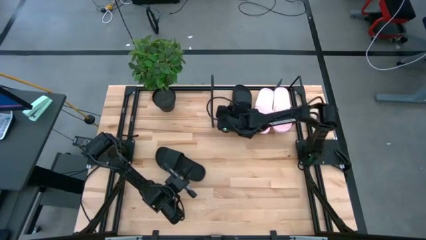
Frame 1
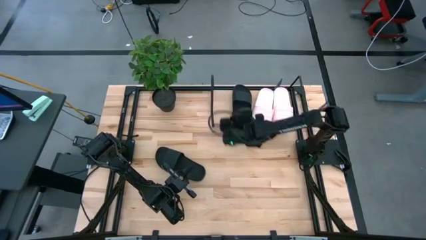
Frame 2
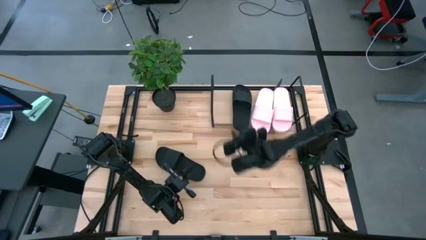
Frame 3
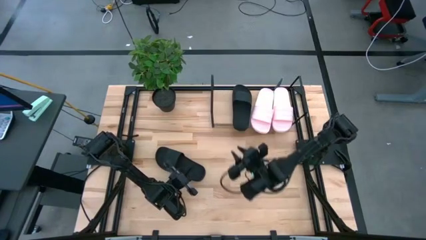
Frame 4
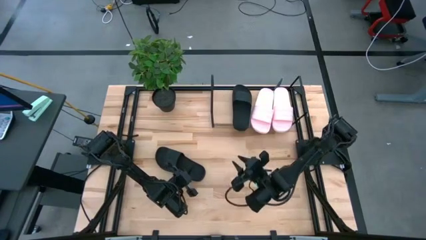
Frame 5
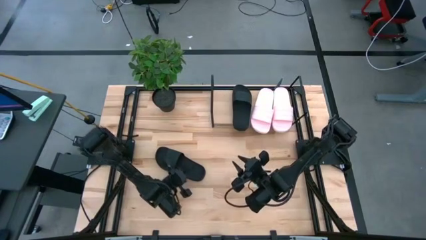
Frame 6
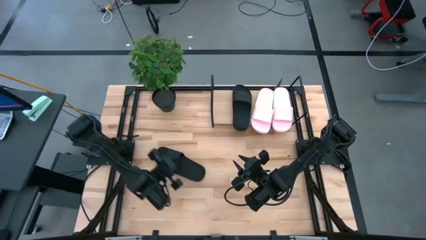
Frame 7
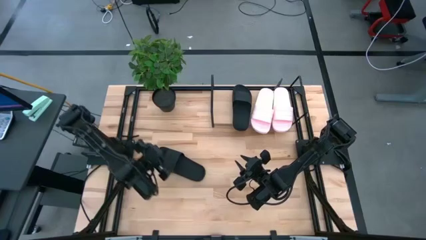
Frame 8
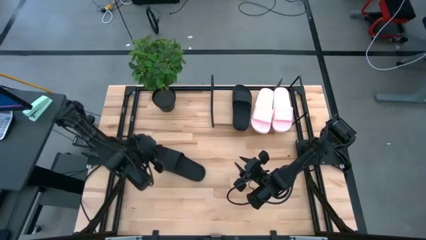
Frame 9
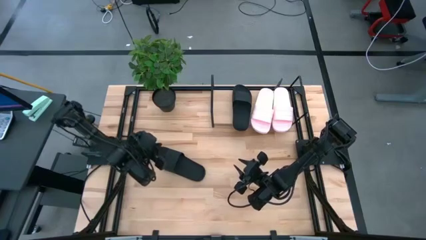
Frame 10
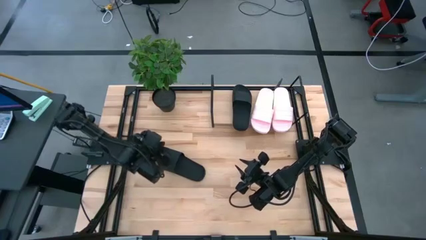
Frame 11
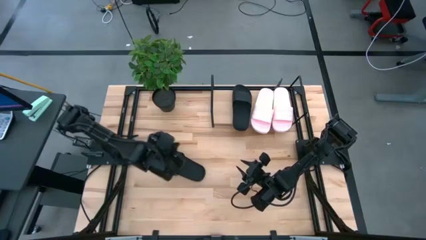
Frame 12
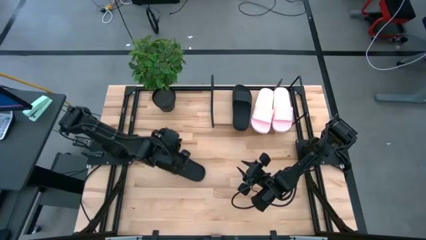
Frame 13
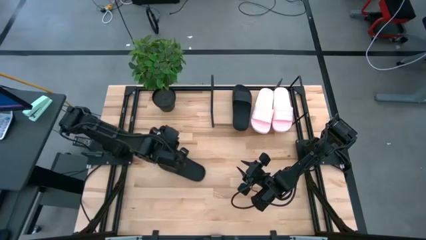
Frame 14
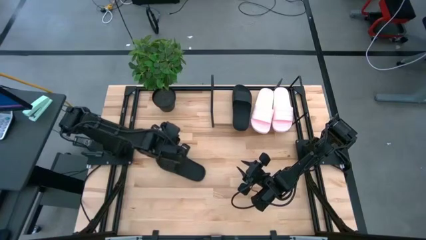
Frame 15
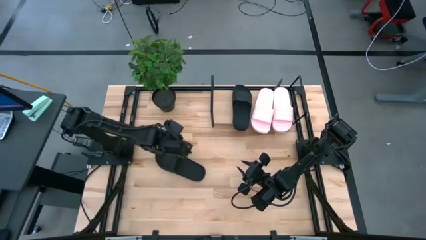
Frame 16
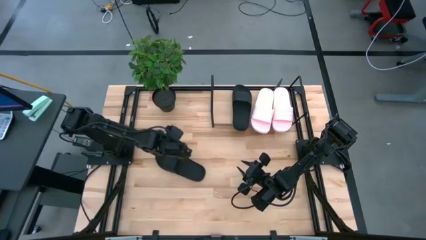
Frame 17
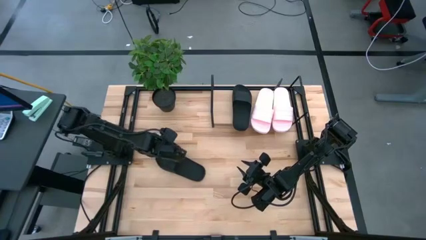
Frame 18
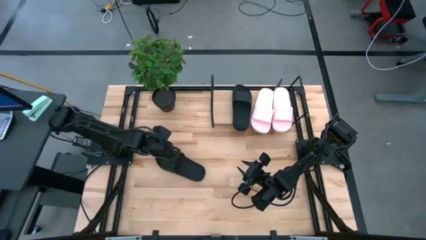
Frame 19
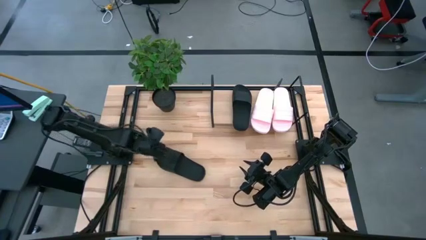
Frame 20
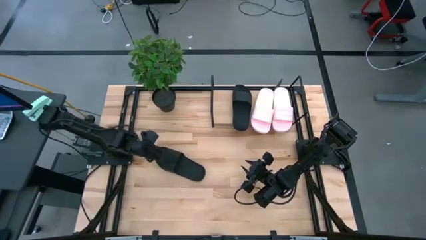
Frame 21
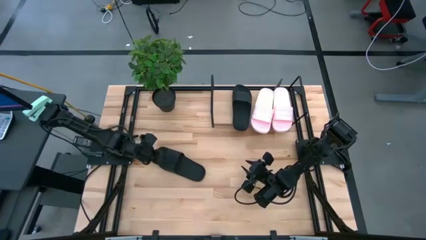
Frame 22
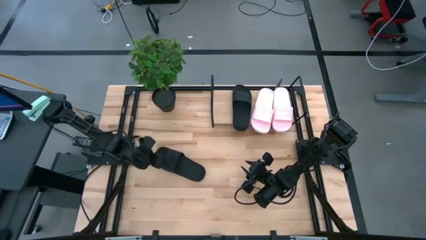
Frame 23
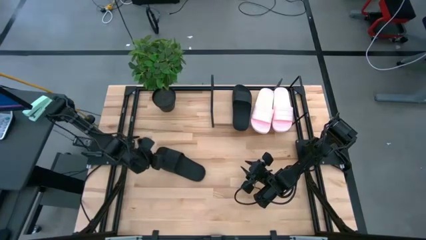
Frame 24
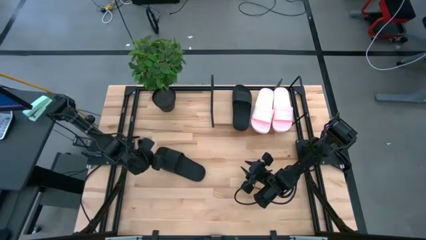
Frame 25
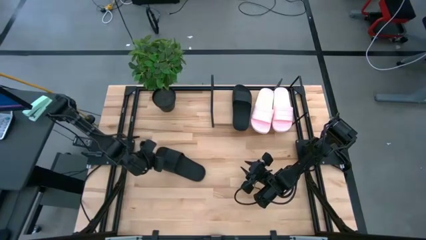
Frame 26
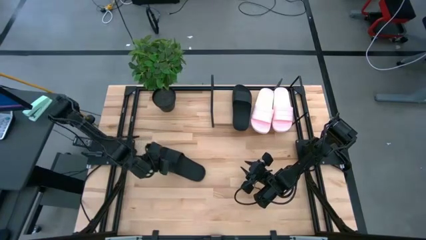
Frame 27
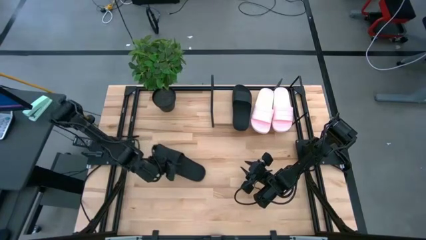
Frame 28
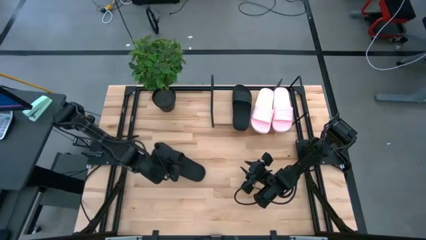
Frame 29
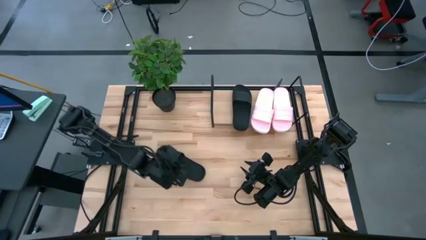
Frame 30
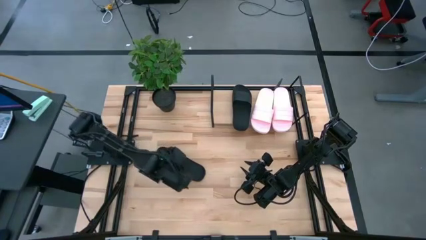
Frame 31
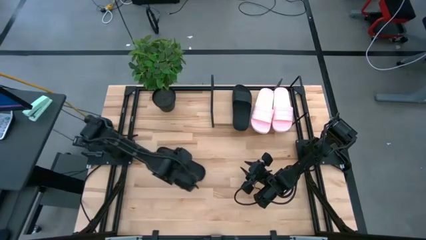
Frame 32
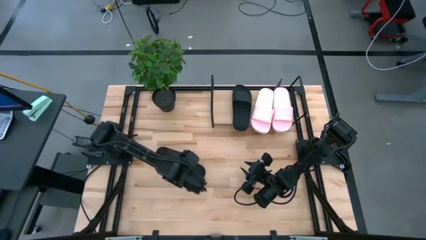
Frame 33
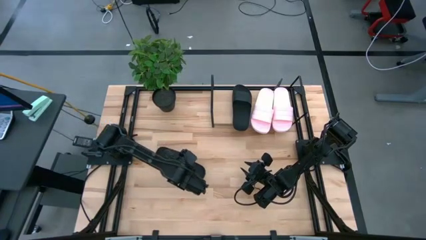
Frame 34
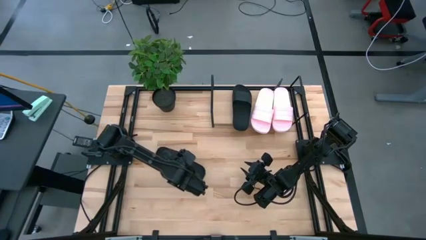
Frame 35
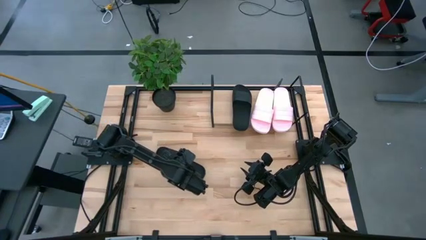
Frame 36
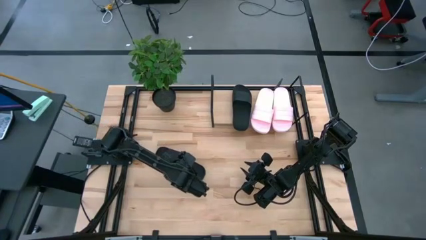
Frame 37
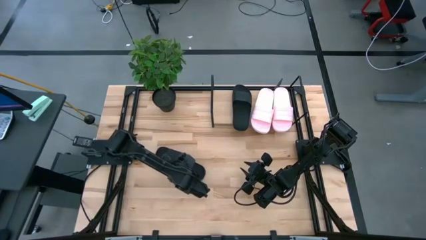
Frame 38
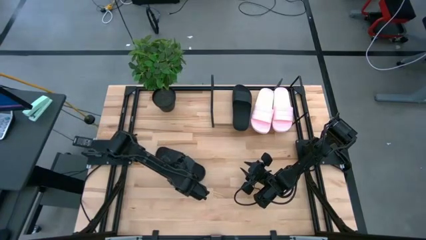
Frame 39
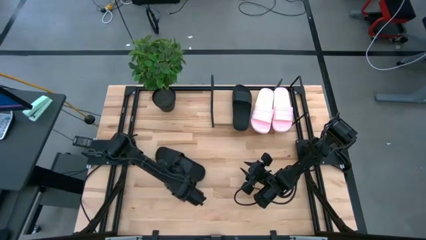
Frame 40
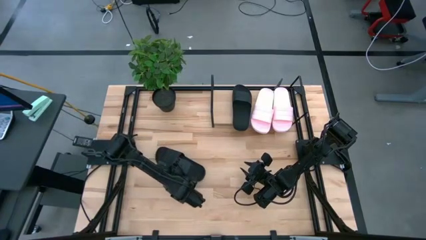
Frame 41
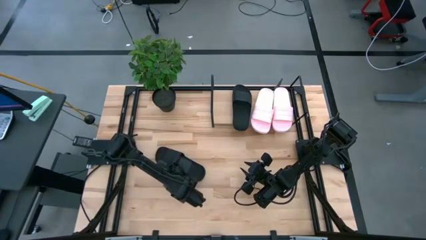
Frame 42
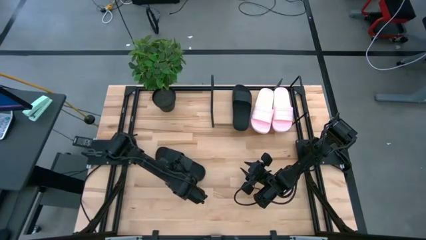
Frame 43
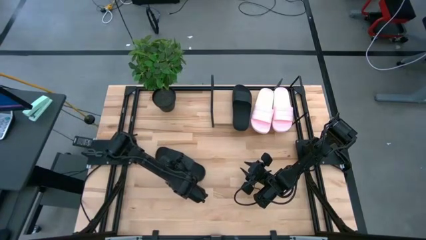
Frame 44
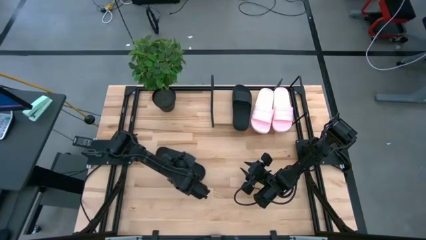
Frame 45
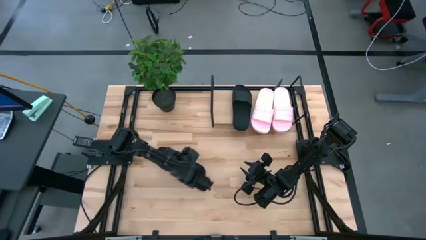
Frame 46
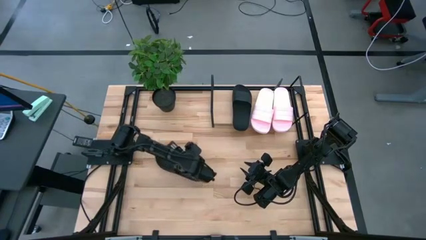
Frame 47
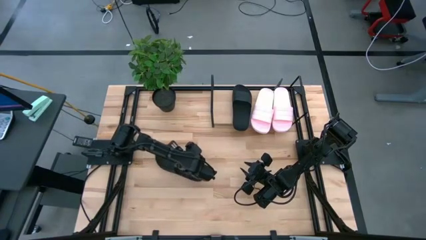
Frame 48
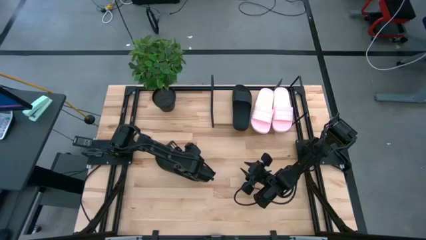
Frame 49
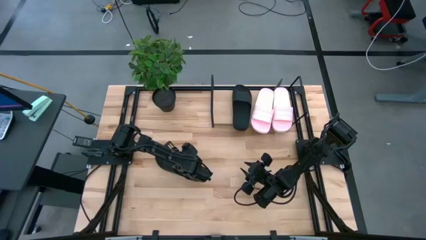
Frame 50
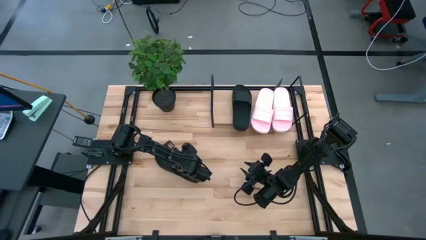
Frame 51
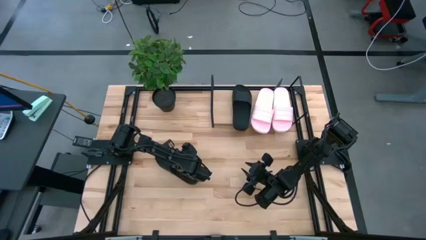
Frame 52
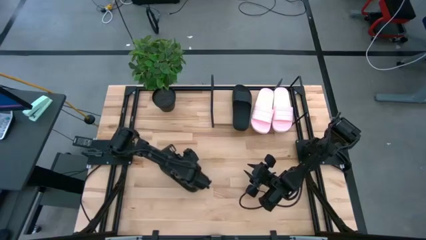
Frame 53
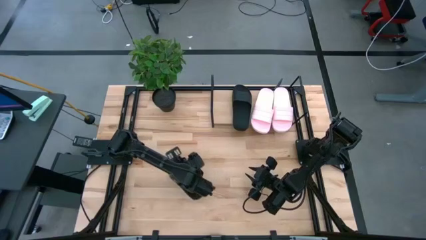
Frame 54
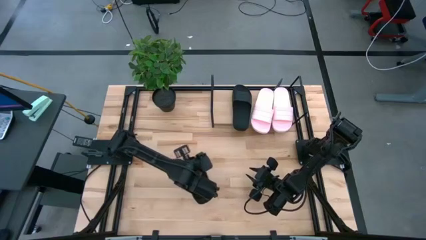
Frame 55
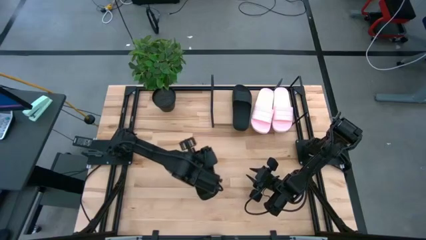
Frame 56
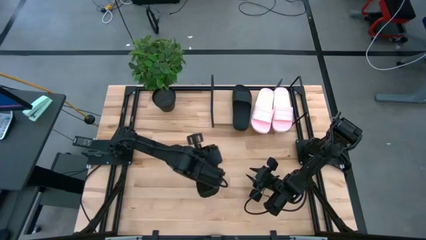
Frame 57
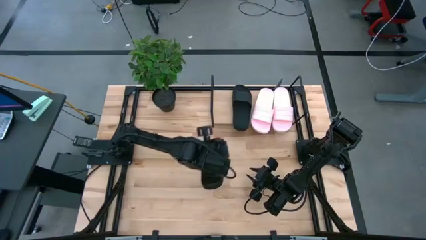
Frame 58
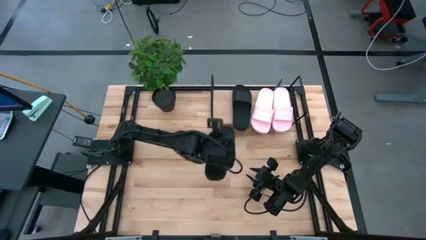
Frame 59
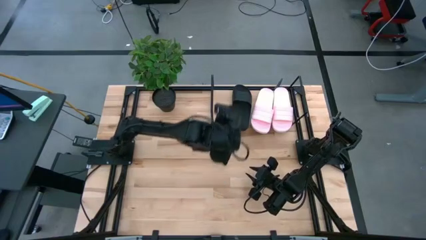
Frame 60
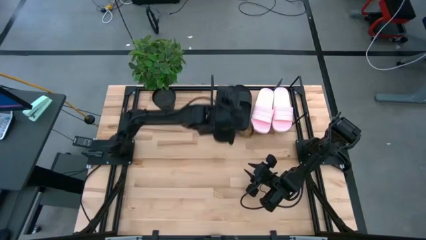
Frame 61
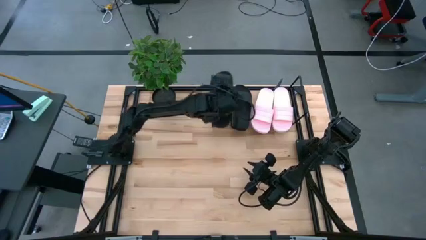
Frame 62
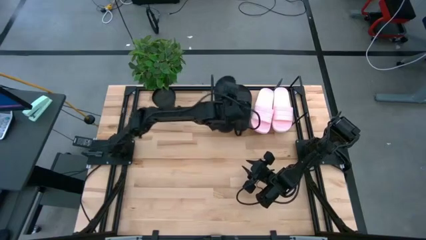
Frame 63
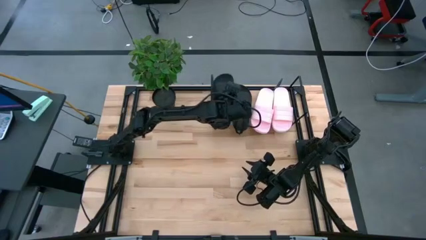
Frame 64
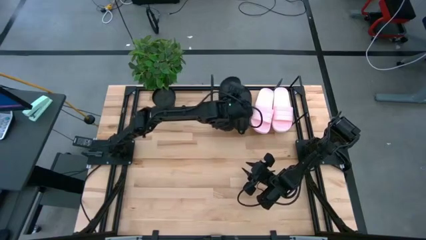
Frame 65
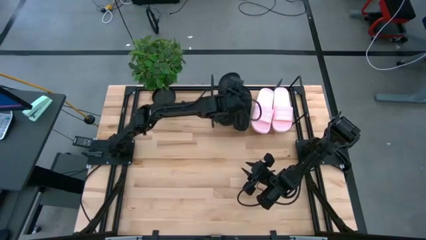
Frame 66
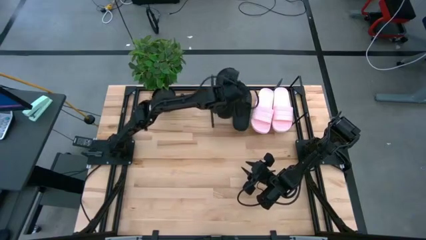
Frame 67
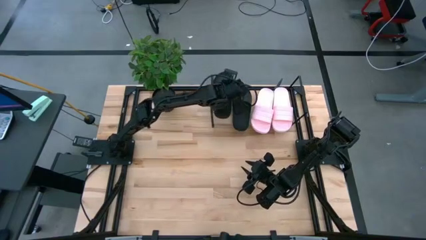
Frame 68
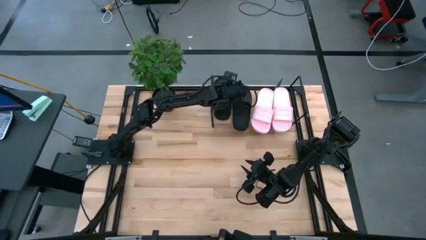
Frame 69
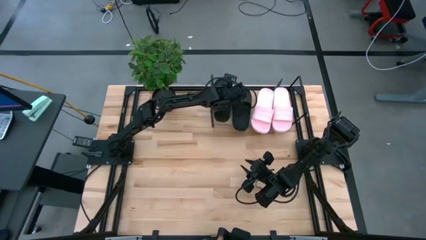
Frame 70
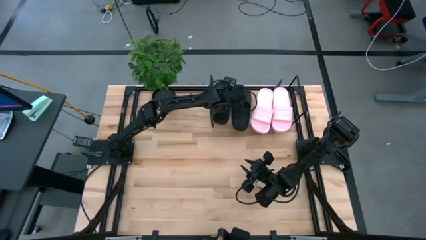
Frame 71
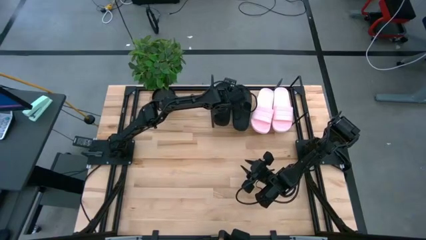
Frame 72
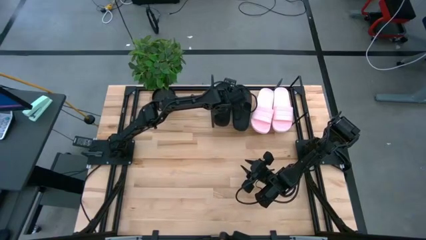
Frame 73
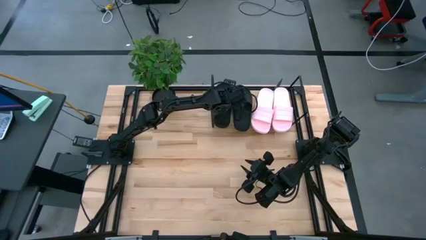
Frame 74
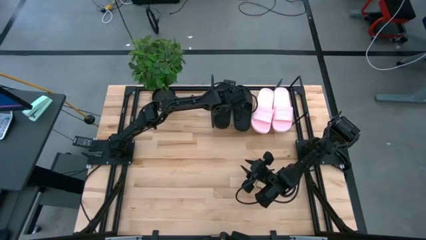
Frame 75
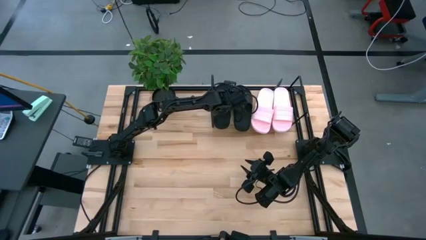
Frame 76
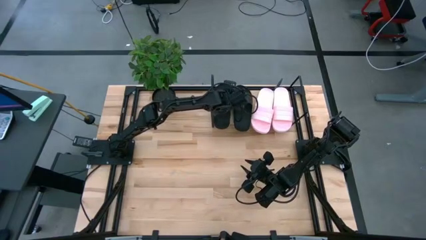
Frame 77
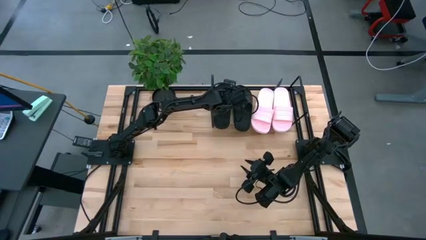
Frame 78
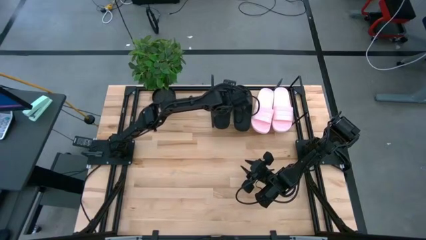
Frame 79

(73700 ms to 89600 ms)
Task: Pick and place slides into the shelf
Put the black slide on the shelf
